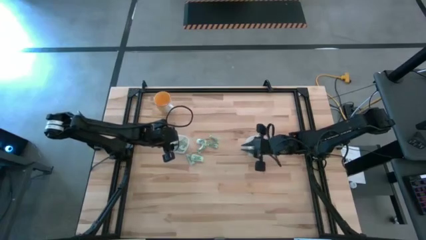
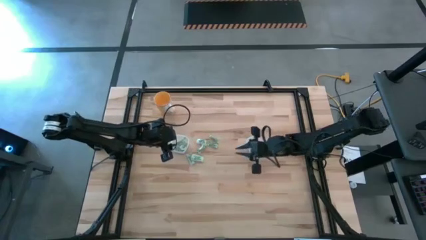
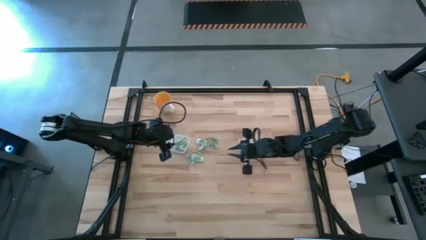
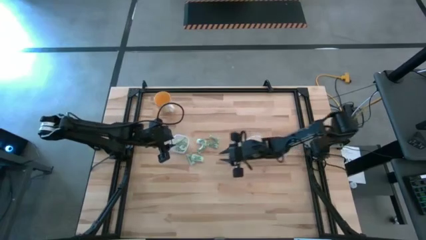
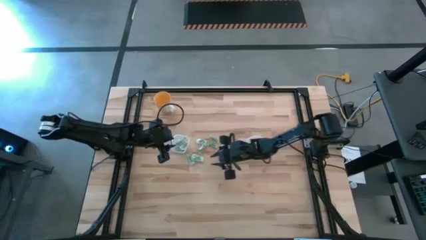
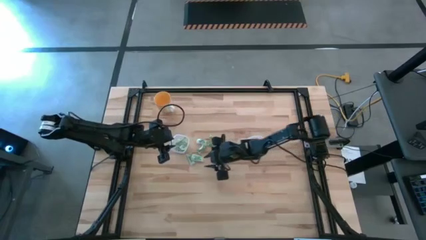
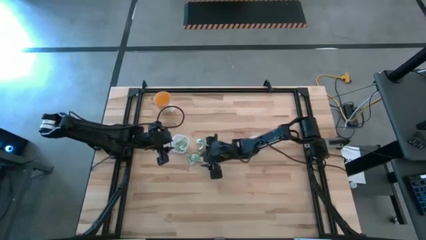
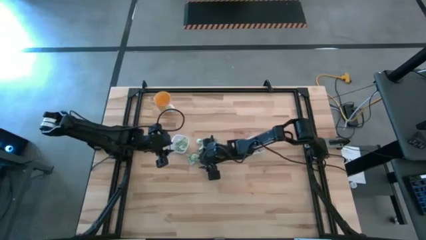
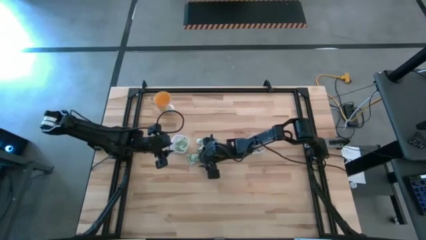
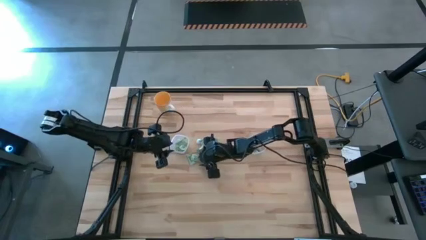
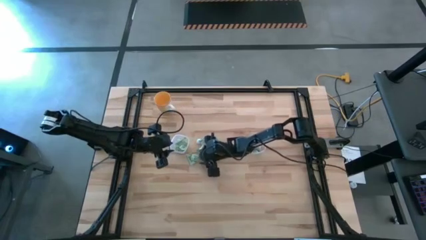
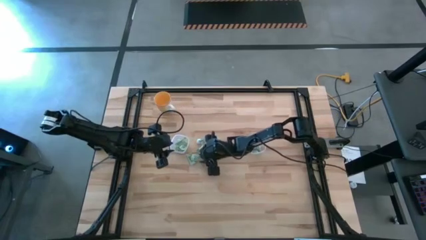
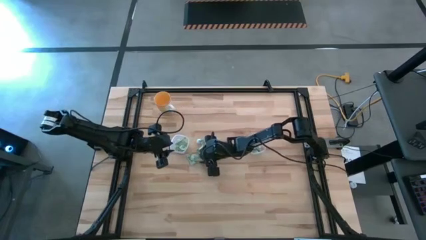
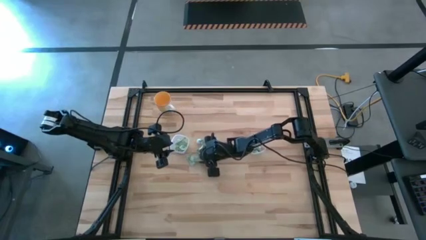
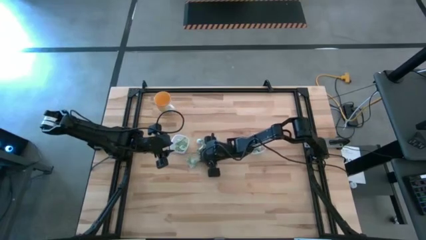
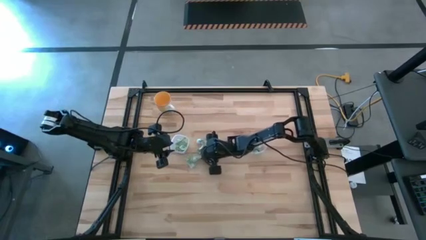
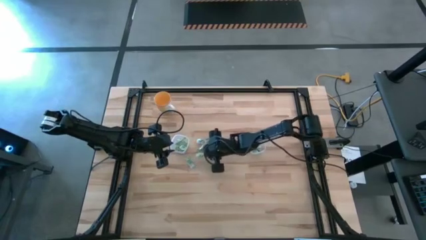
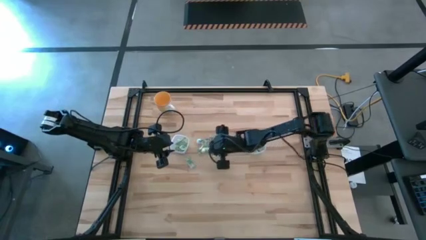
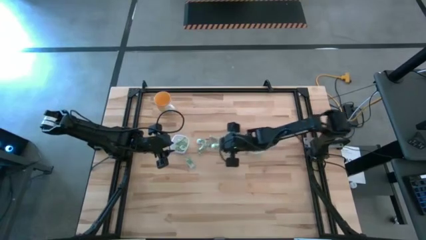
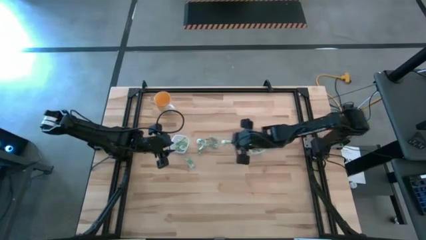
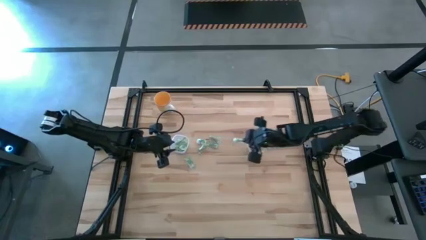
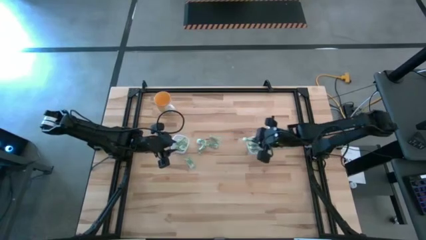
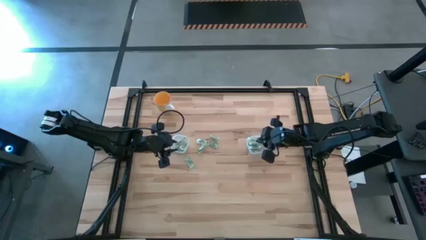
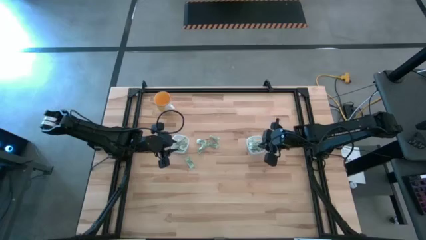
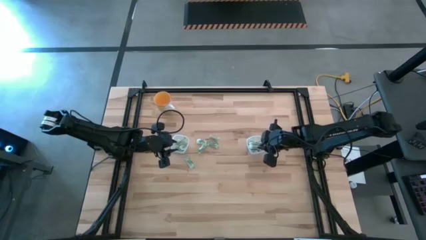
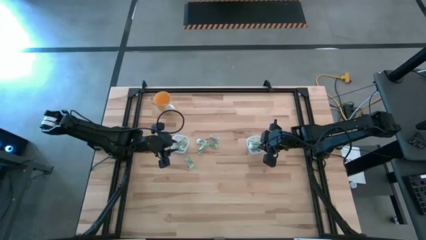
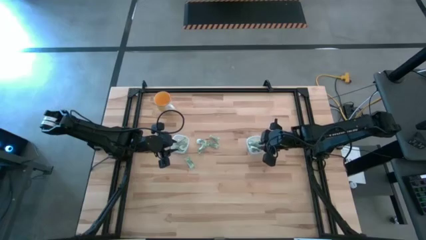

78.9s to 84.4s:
Task: Pick and place Stevia / Truvia into bins
Put the stevia packet into the right transparent container

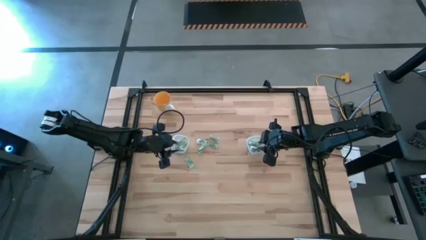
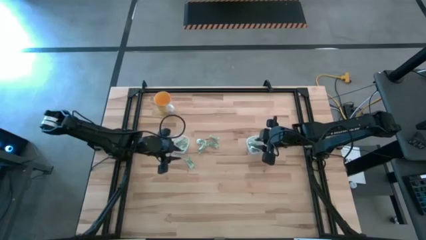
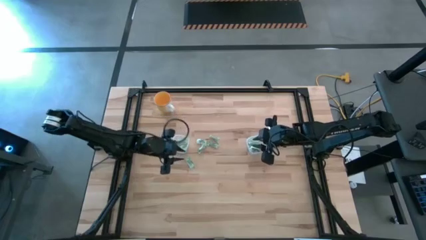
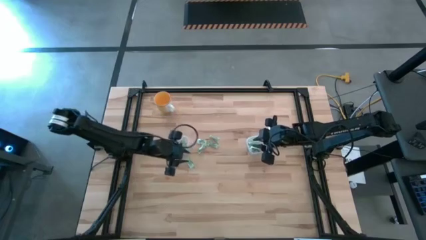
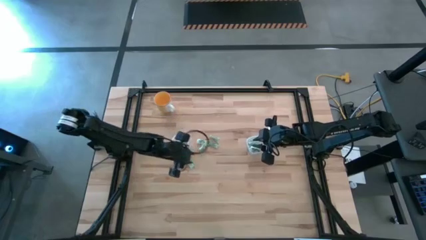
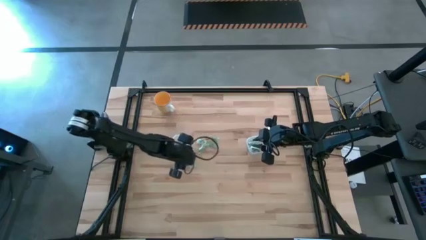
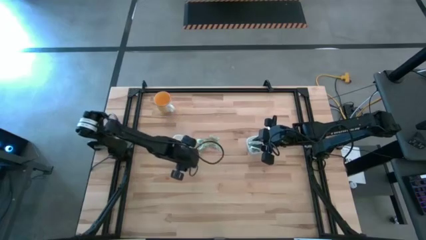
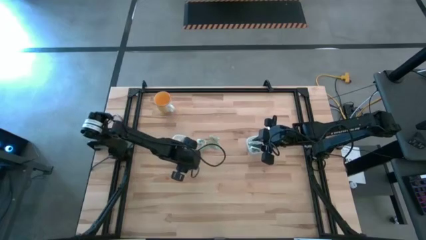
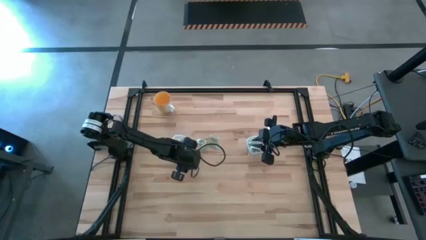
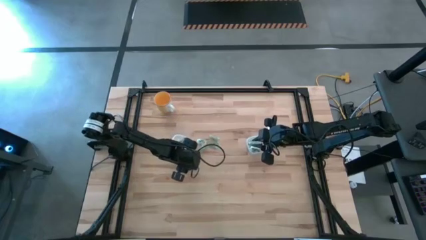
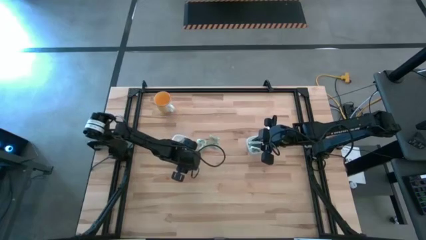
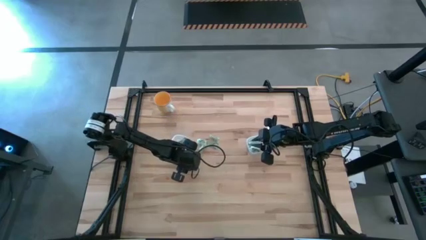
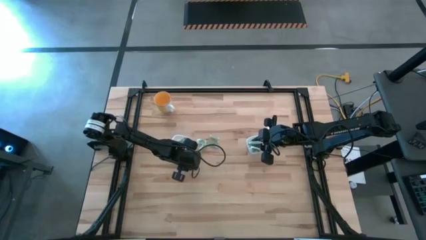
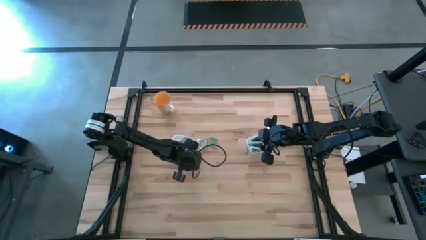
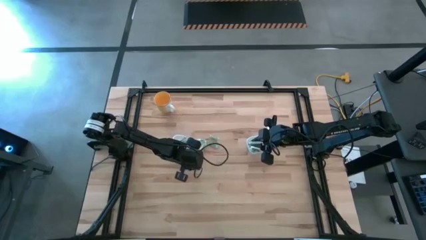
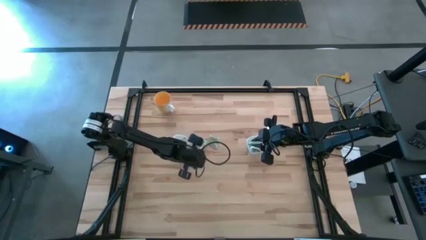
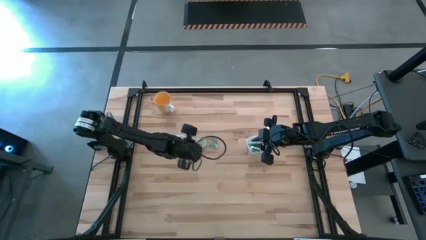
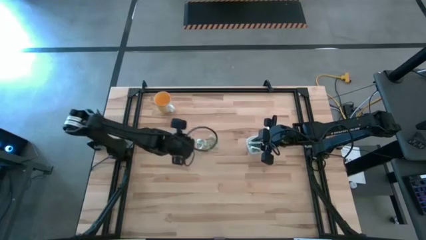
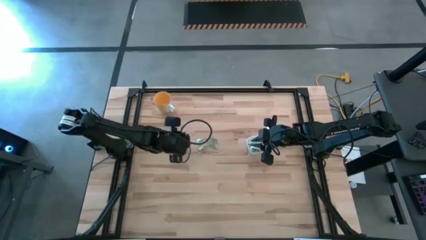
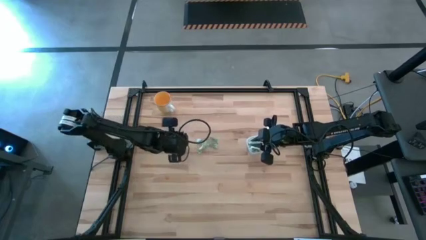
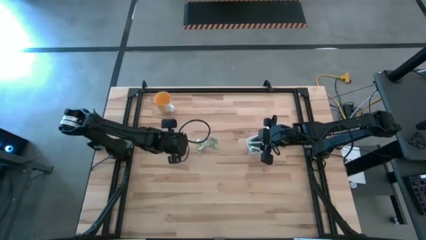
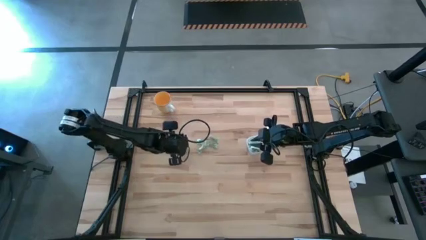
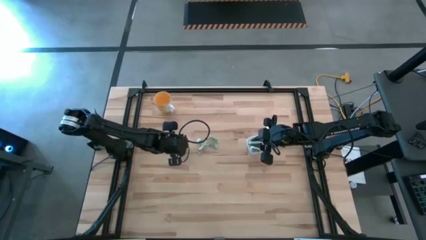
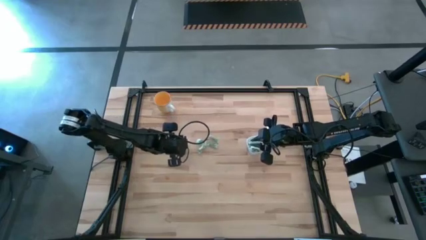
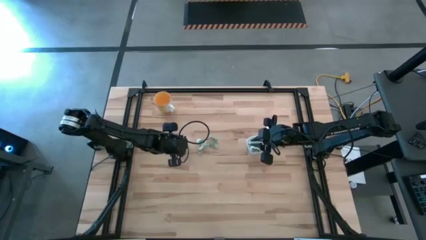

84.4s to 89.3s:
Put the stevia packet into the left transparent container

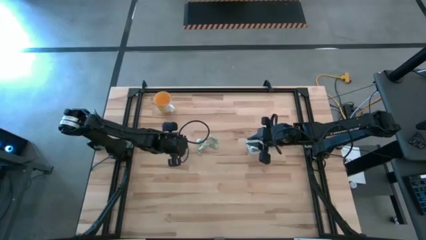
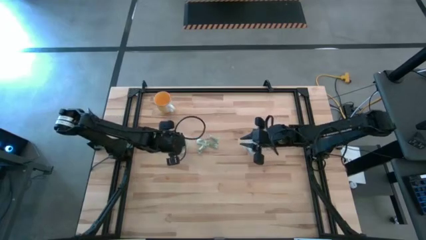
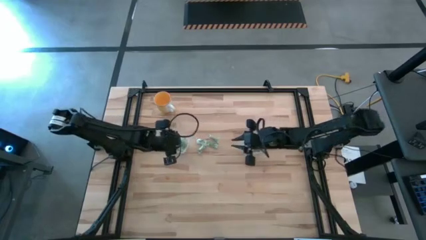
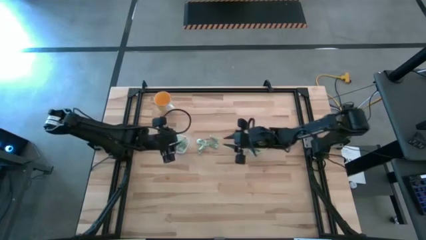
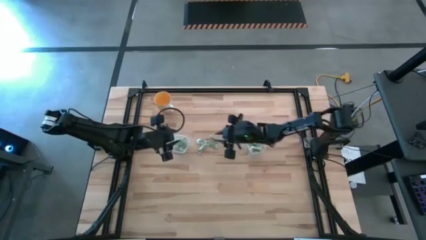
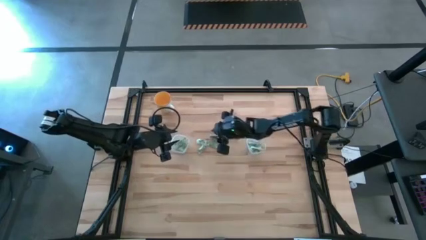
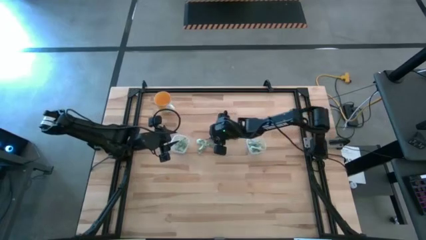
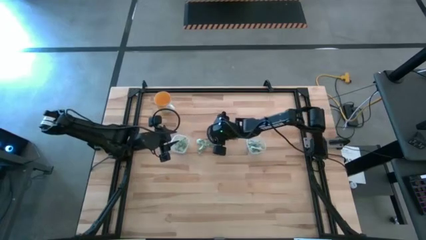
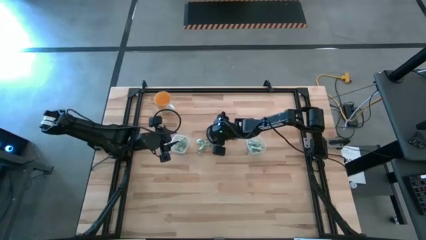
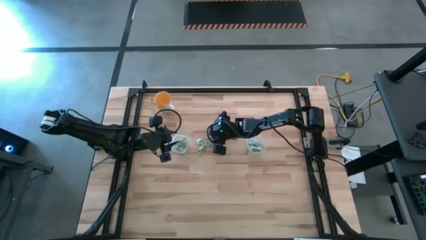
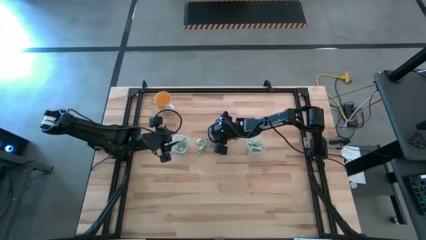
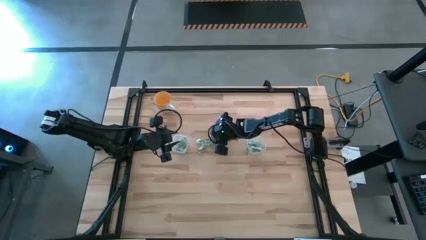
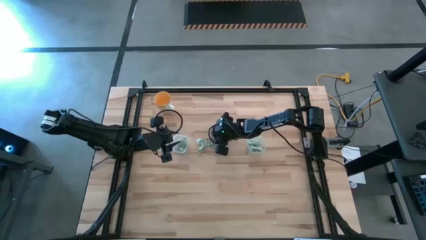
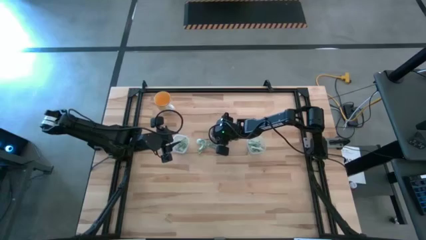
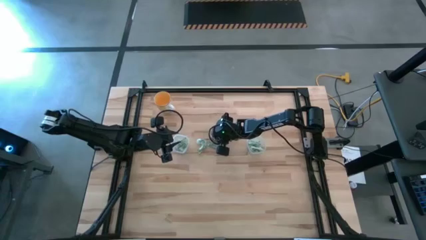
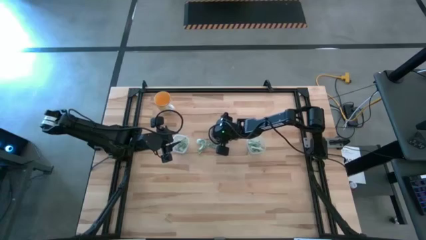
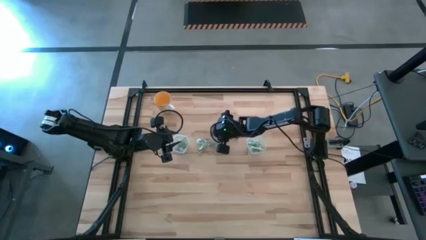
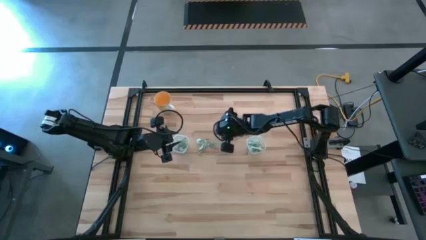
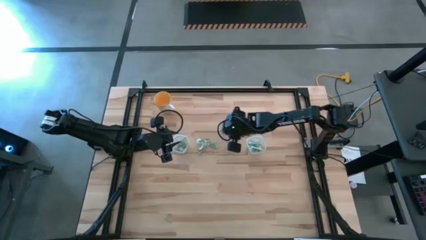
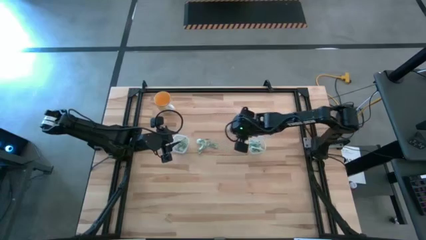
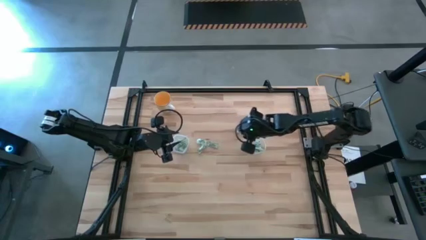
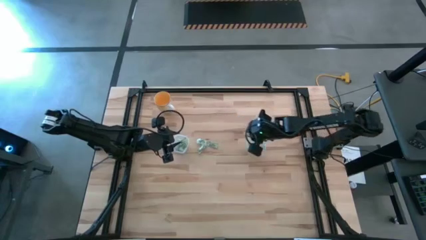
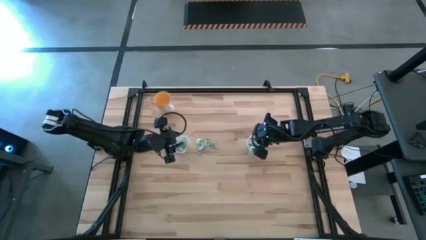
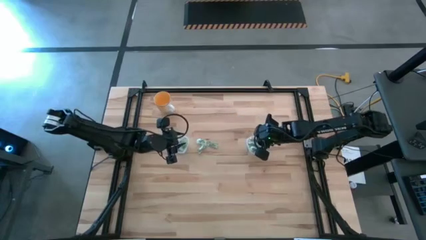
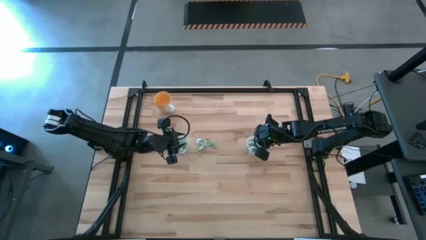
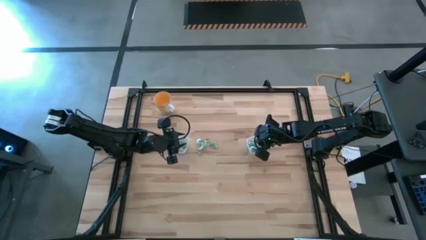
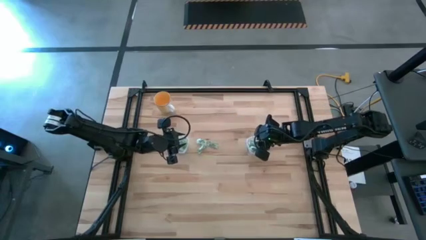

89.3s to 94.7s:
Put the stevia packet into the right transparent container

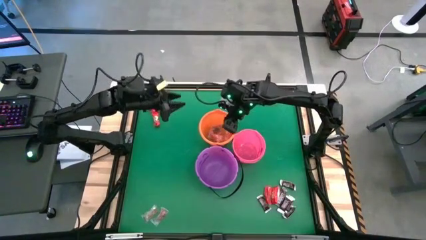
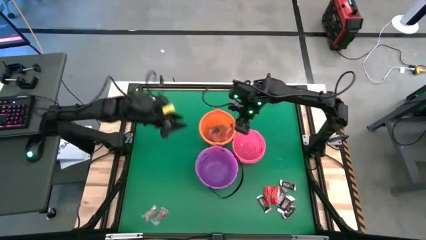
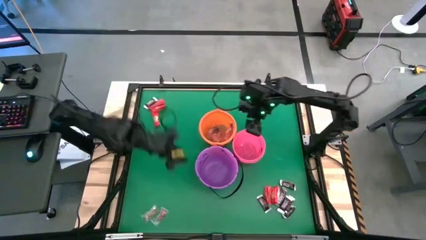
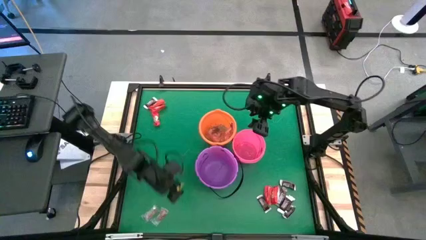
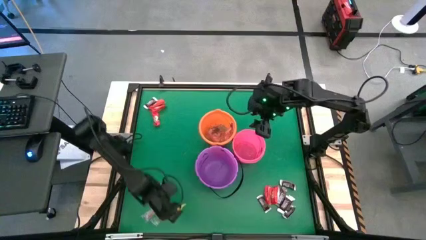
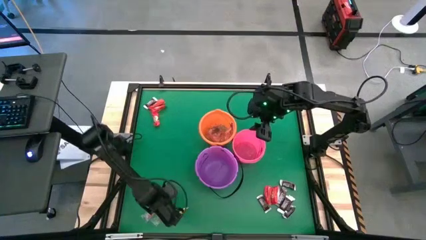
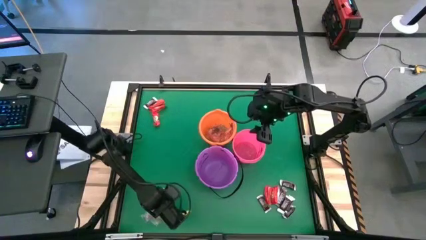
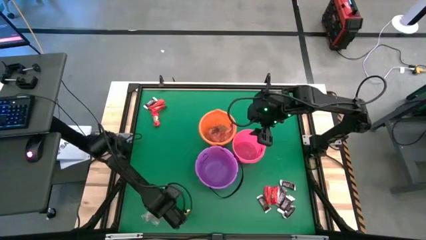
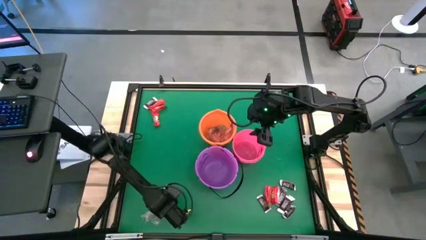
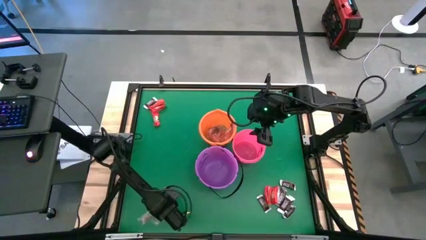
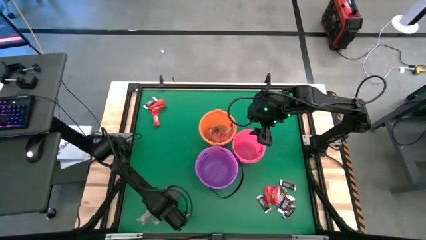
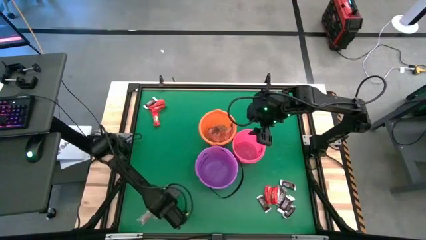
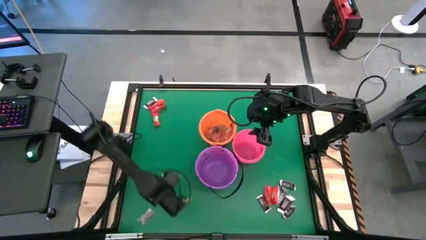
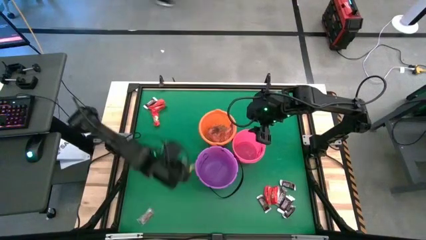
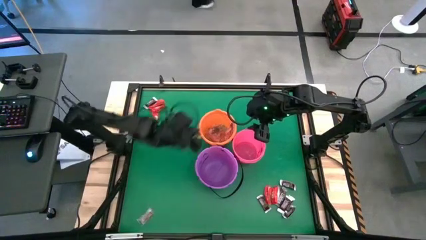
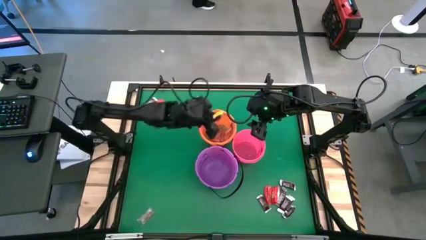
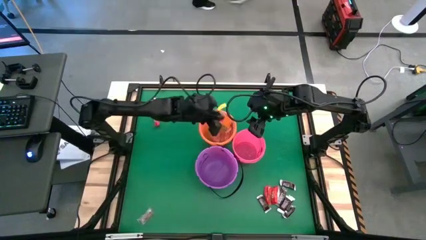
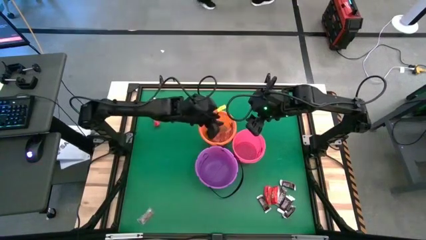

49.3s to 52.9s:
Task: Sort candy by brand, put in halloween buckets
Put the red gummy into the orange bucket
